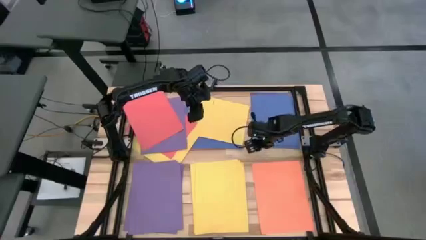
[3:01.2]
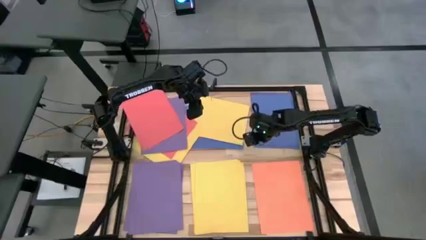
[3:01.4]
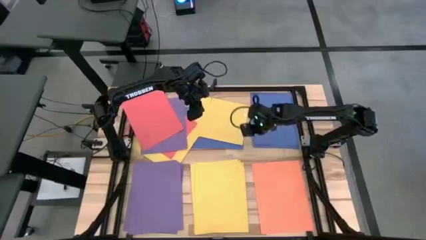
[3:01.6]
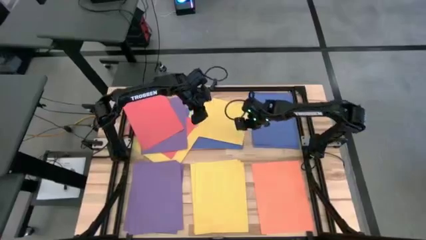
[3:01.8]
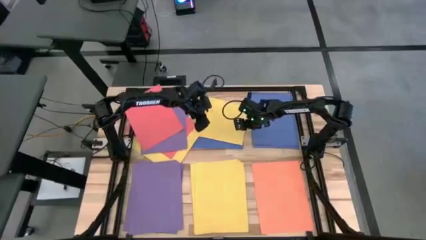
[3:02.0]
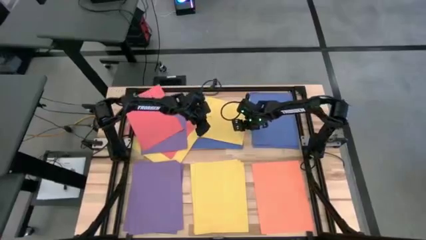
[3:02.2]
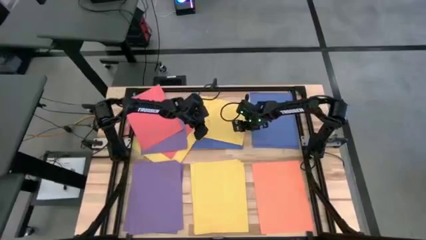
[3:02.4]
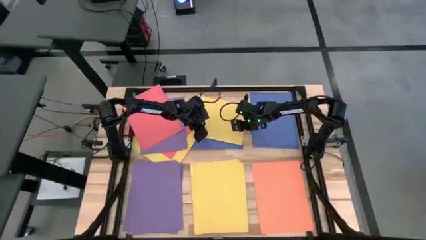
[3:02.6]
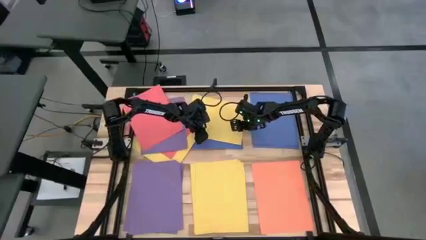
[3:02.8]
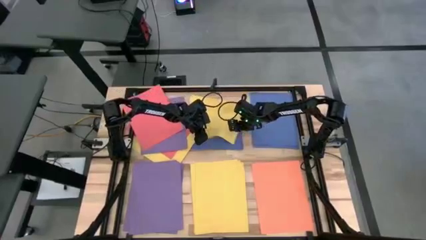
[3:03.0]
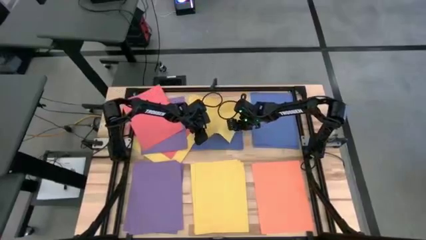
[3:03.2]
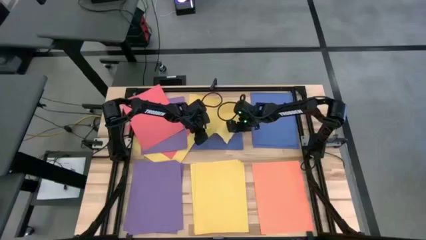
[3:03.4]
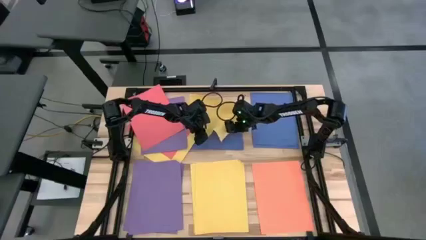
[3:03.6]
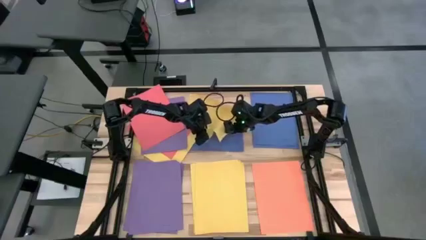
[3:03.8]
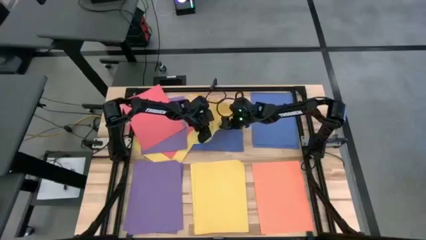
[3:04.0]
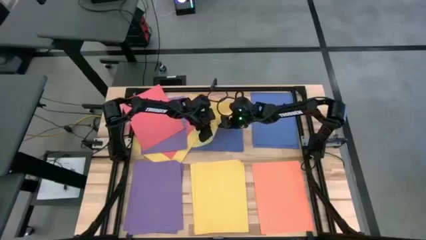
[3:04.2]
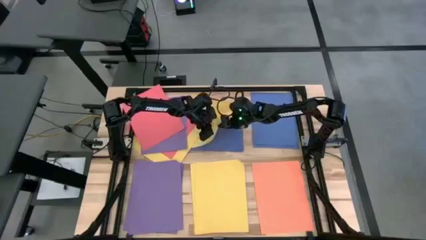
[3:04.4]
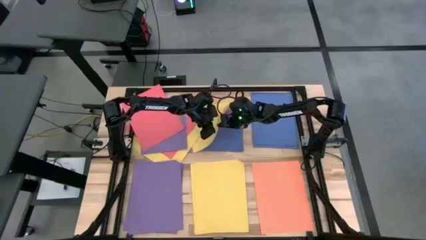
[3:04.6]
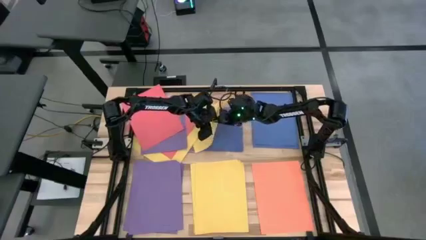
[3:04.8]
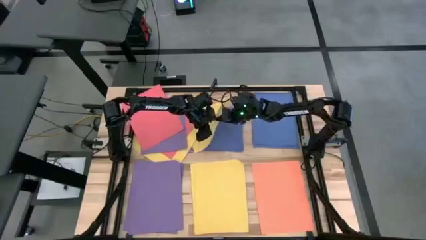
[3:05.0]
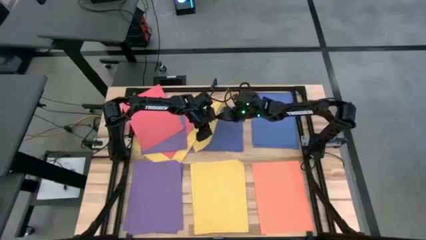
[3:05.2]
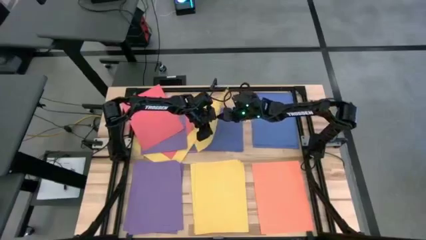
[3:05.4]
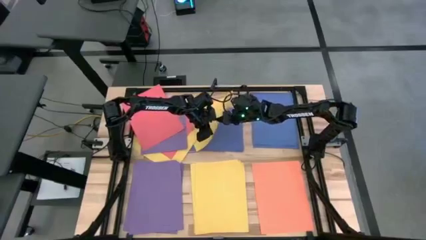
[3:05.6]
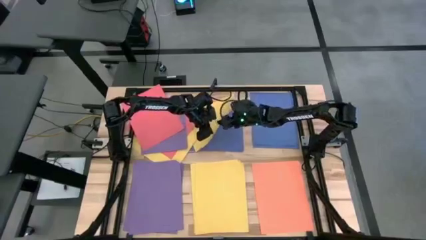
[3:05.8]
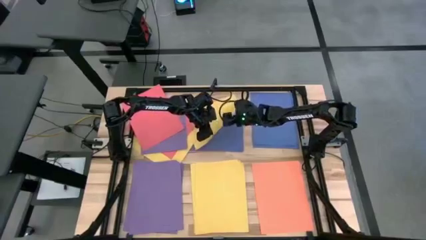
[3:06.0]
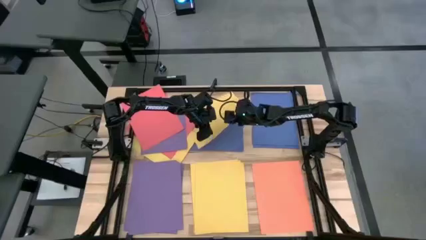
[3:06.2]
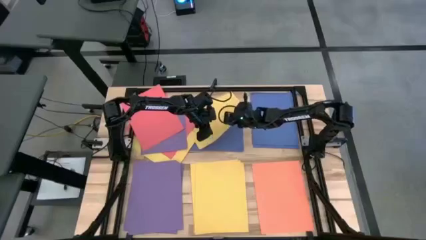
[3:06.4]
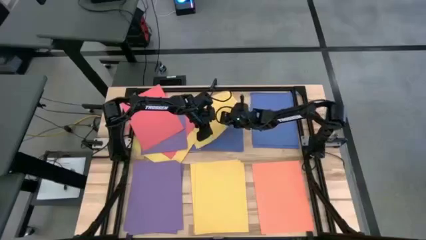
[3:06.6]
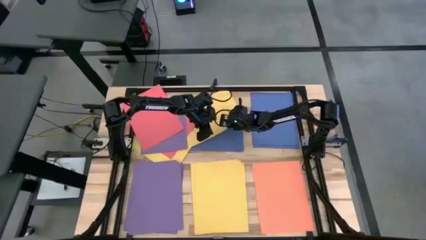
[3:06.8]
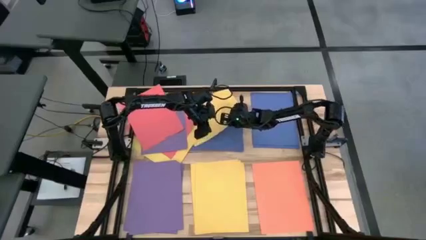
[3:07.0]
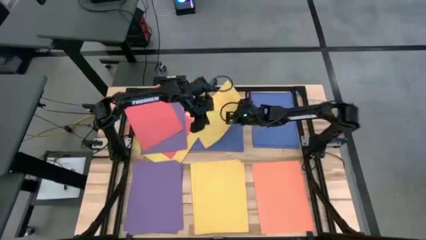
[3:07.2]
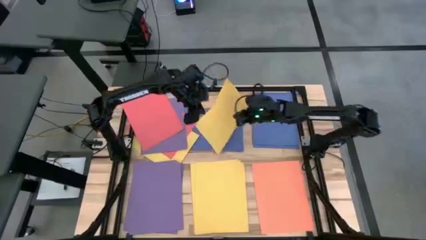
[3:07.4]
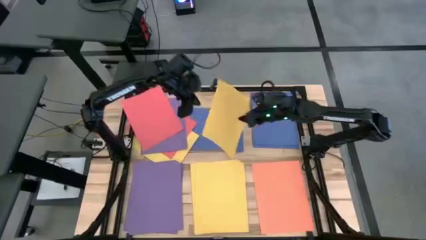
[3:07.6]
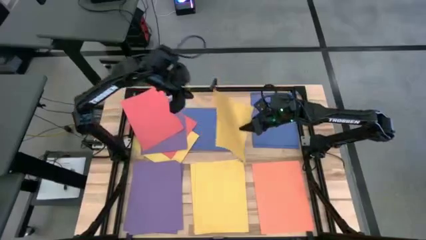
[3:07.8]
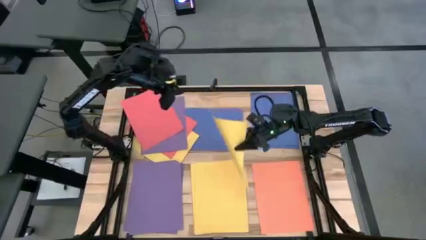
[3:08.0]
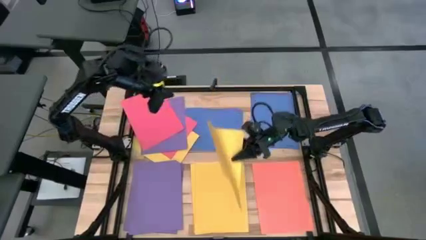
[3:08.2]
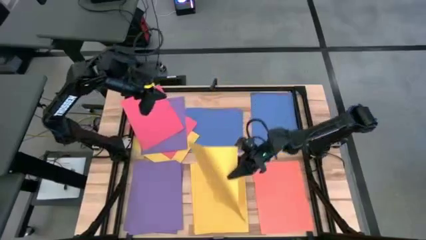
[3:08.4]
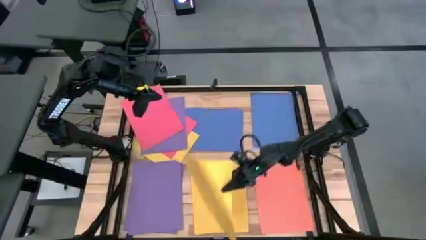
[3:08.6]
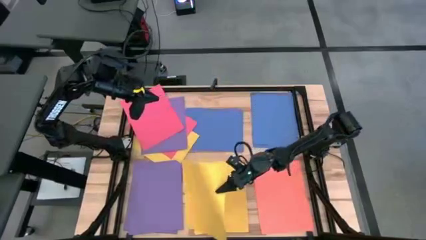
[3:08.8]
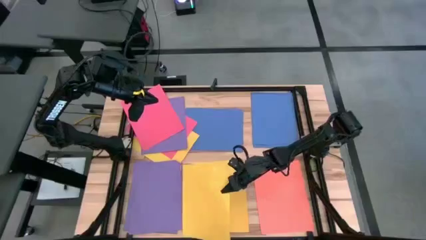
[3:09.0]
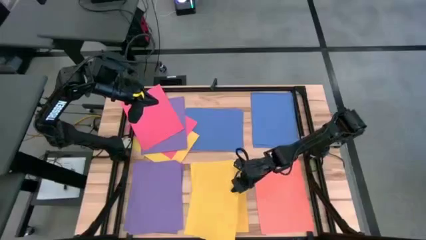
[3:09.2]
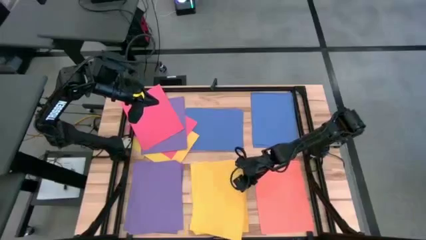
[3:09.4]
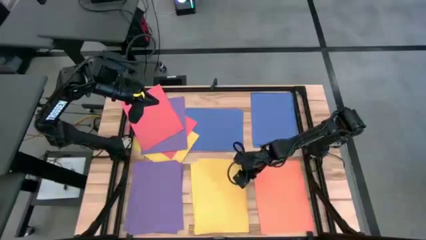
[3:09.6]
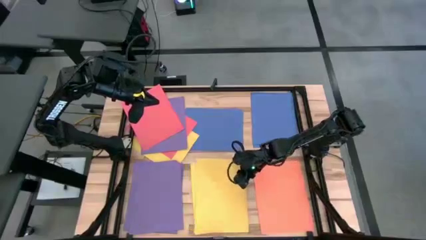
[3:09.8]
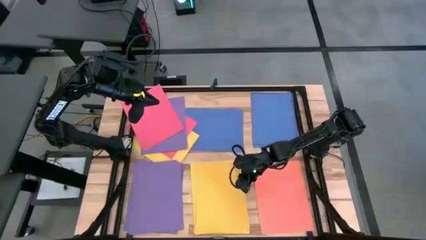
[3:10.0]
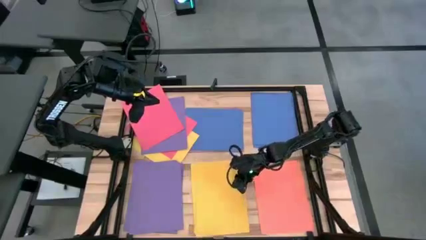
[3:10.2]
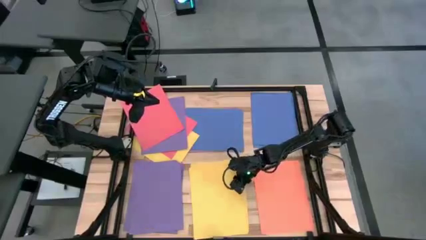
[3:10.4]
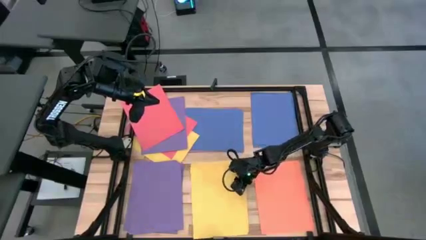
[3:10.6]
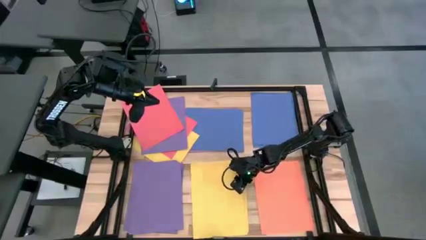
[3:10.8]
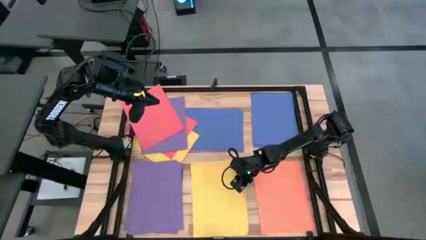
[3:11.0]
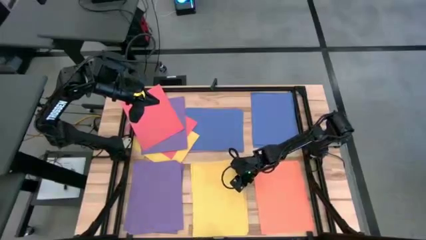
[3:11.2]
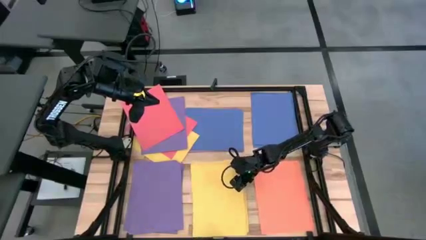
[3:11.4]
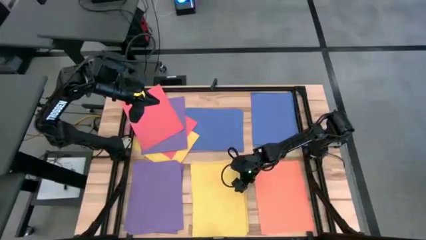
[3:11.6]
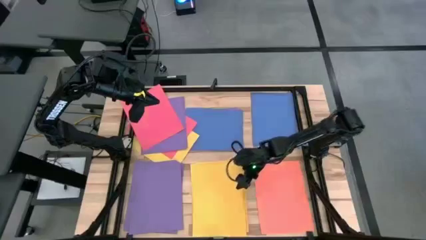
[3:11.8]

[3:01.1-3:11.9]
Task: Organize paper
Stack the yellow paper on top of the yellow paper

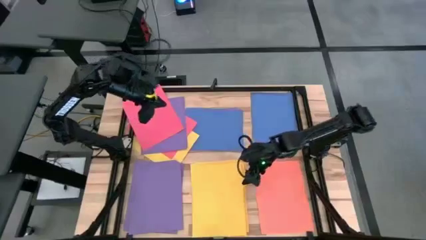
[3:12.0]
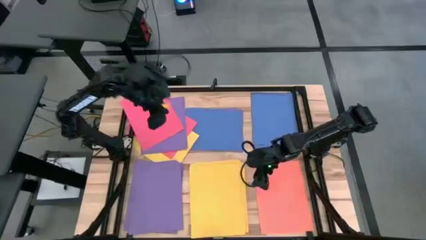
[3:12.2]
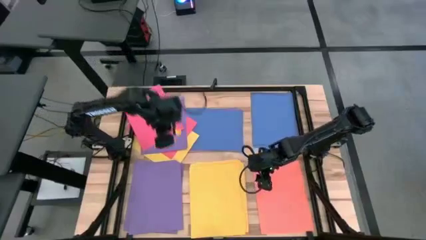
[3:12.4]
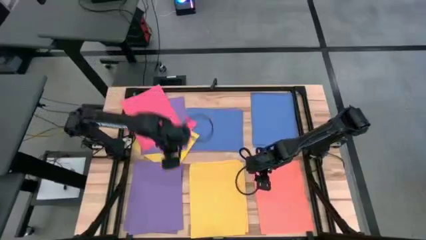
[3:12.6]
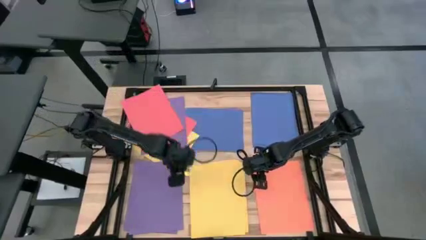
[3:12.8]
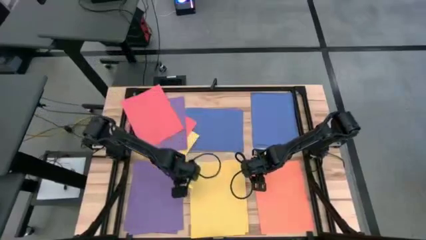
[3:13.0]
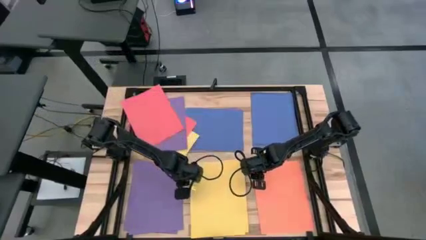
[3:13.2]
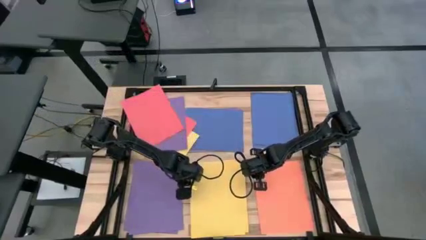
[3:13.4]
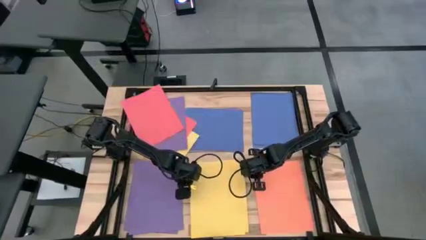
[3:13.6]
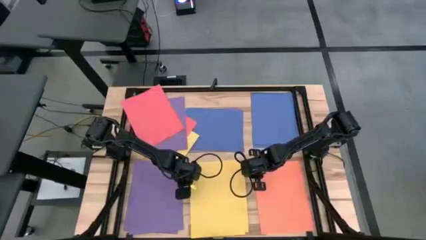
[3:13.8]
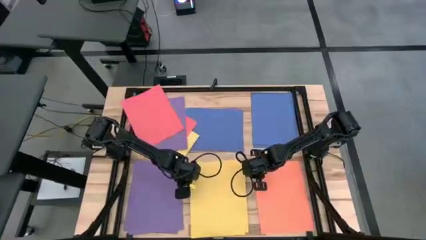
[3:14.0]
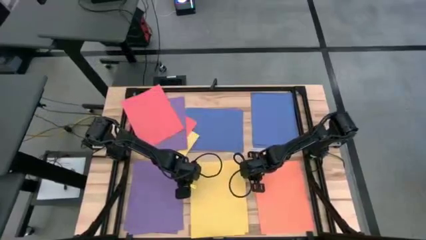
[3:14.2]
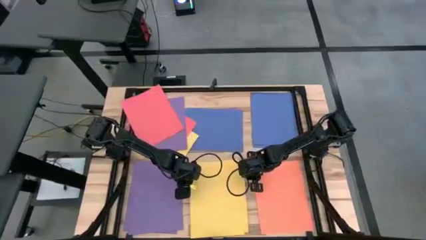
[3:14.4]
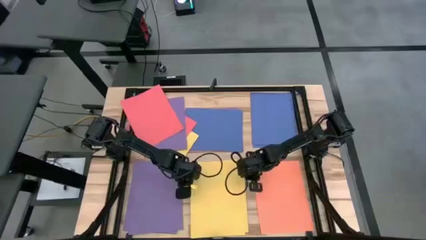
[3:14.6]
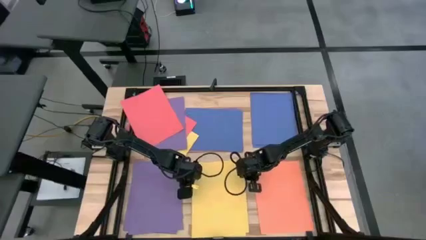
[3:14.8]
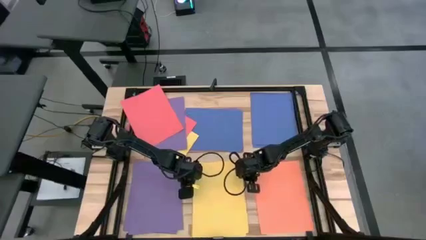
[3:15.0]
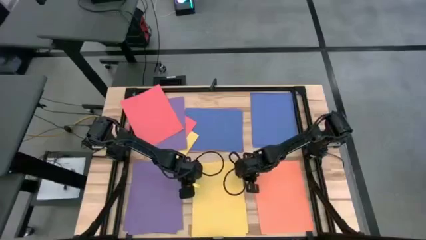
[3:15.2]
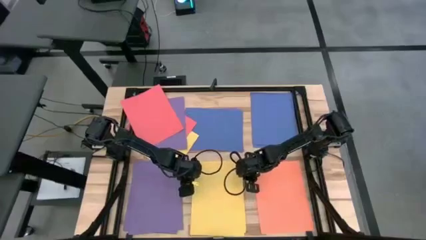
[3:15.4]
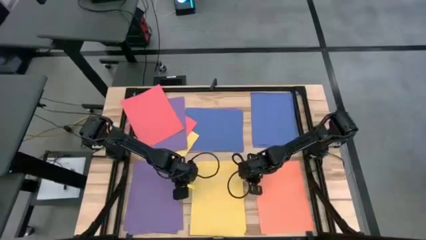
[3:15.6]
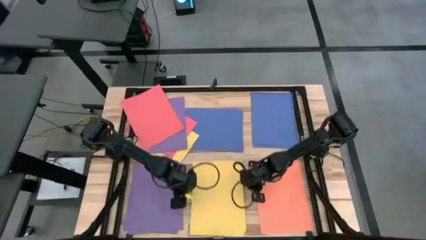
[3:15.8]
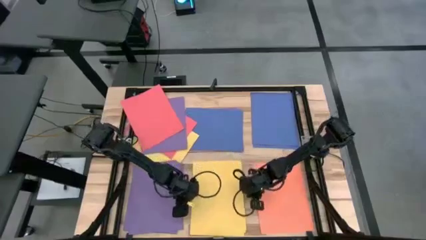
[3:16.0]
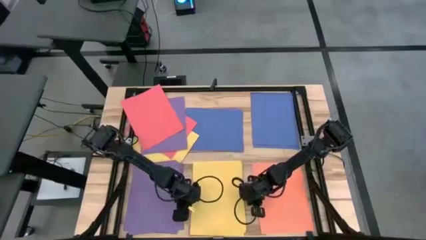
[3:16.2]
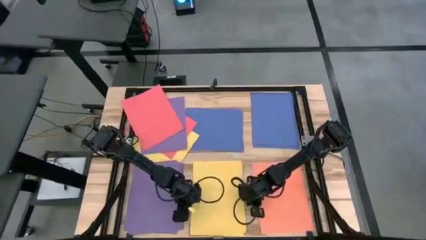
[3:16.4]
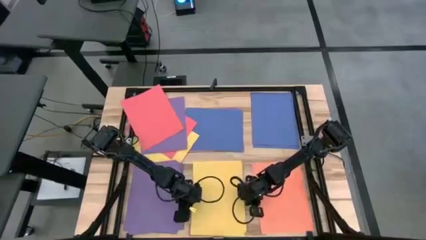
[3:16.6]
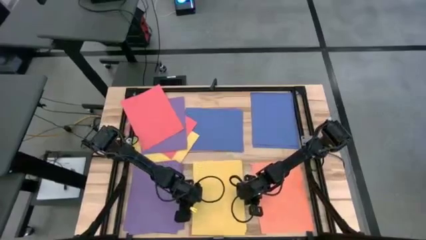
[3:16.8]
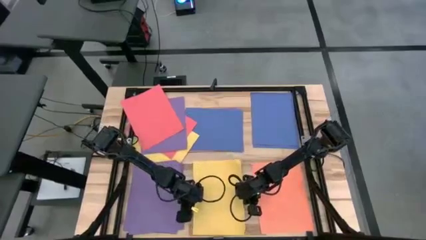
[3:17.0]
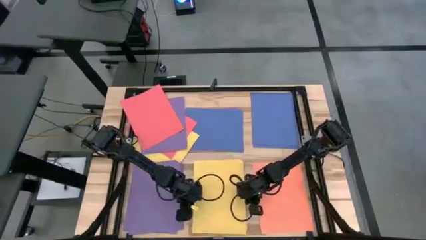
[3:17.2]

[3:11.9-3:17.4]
Adjust the stacked yellow papers
